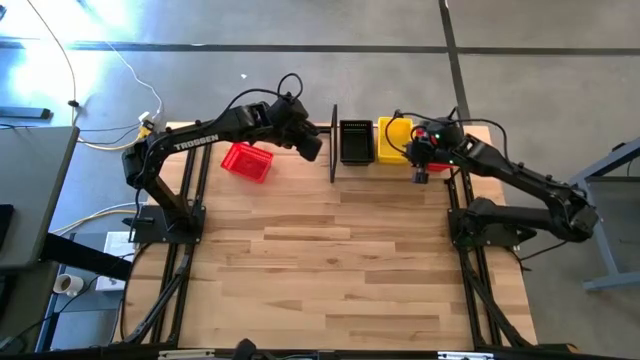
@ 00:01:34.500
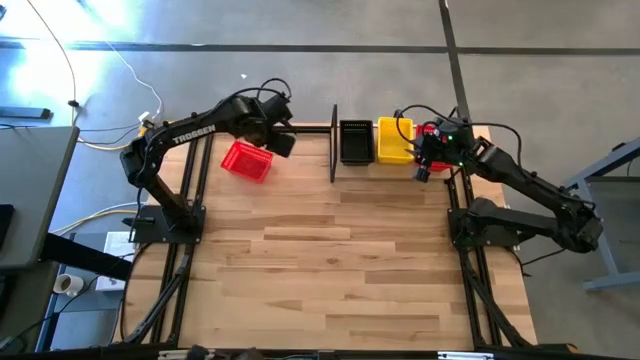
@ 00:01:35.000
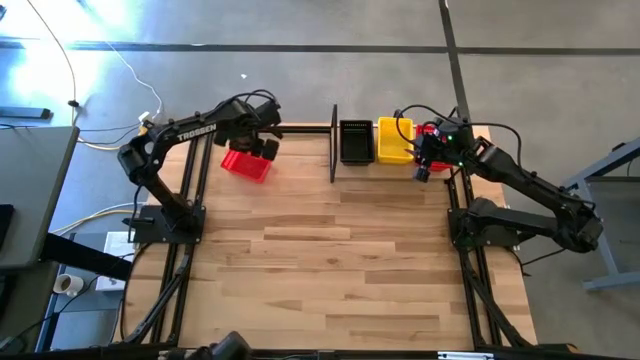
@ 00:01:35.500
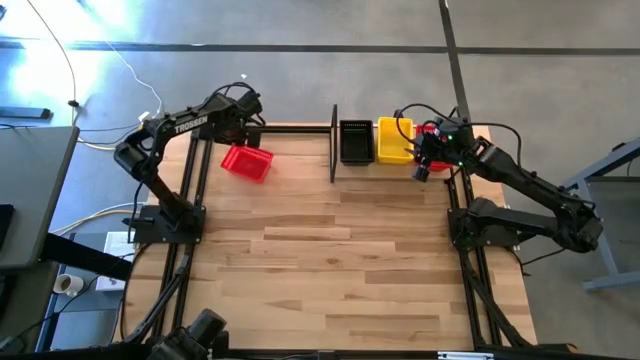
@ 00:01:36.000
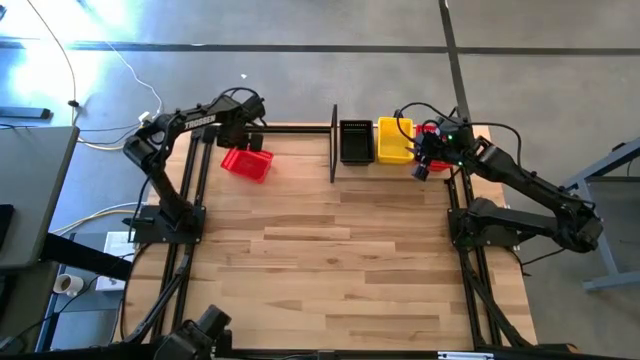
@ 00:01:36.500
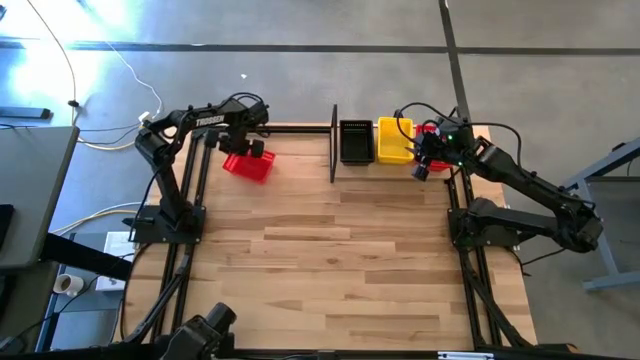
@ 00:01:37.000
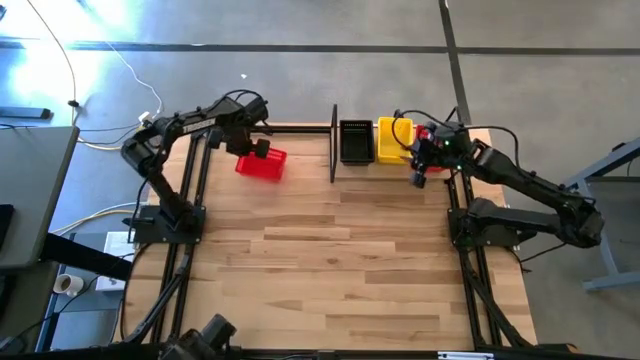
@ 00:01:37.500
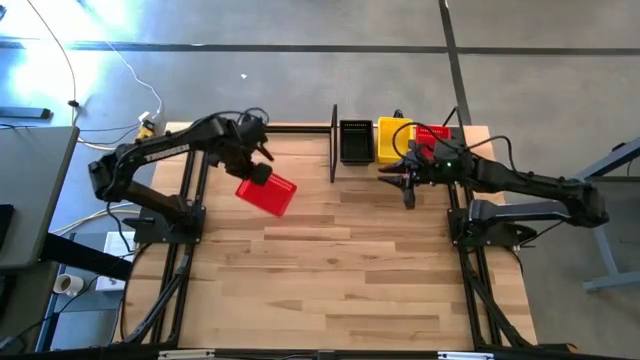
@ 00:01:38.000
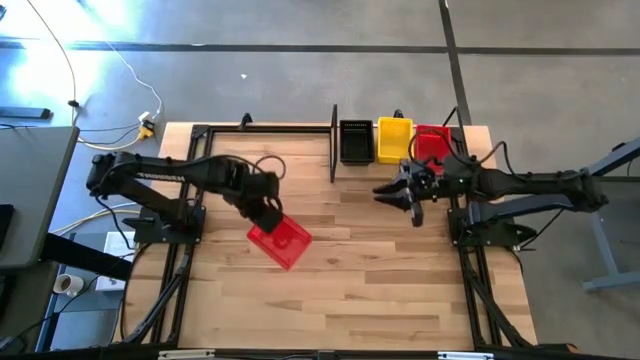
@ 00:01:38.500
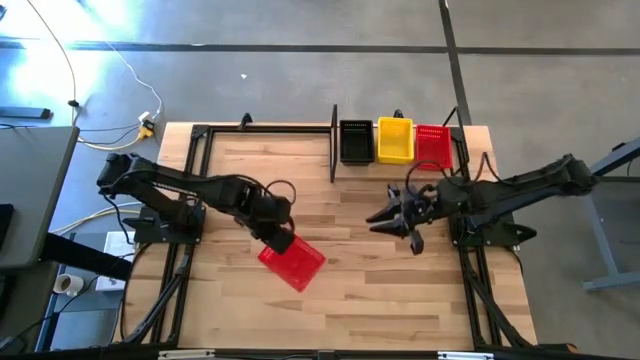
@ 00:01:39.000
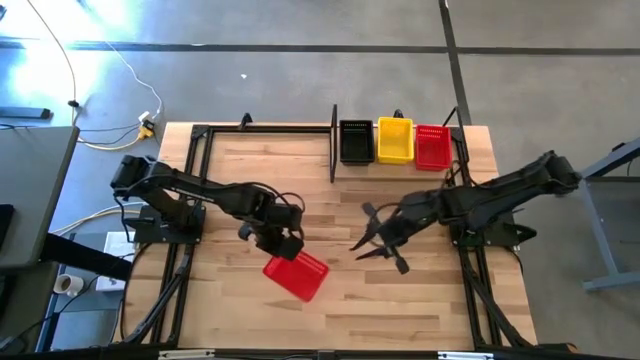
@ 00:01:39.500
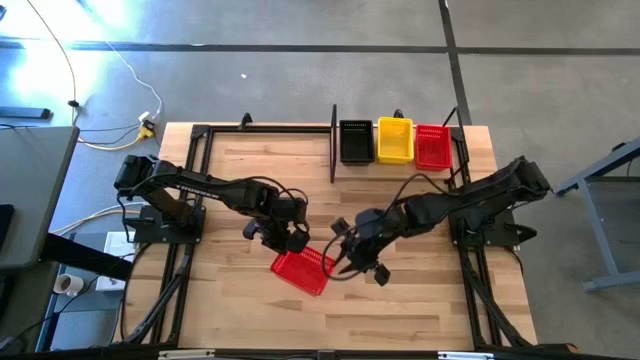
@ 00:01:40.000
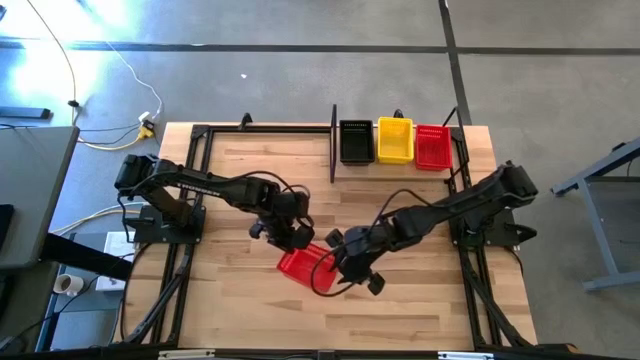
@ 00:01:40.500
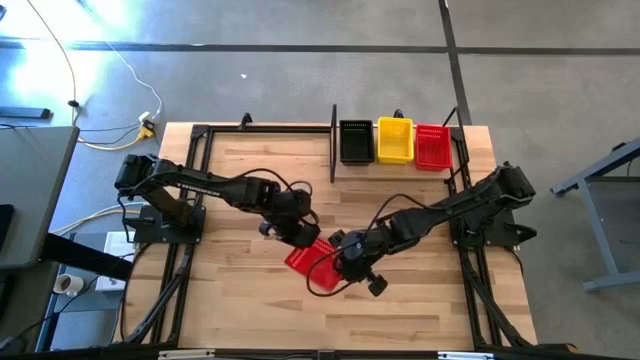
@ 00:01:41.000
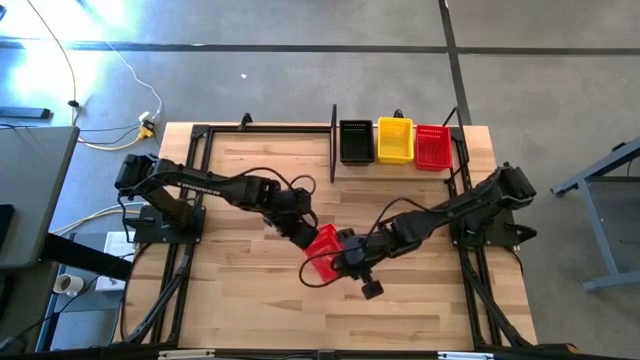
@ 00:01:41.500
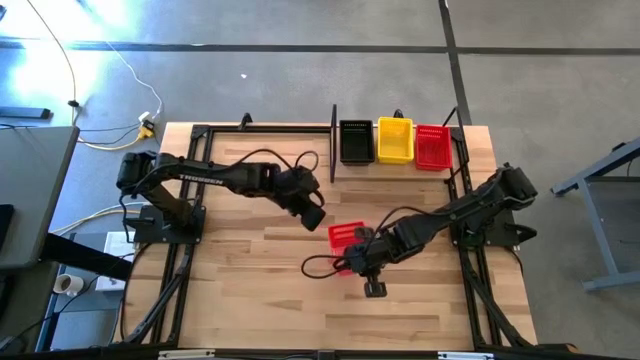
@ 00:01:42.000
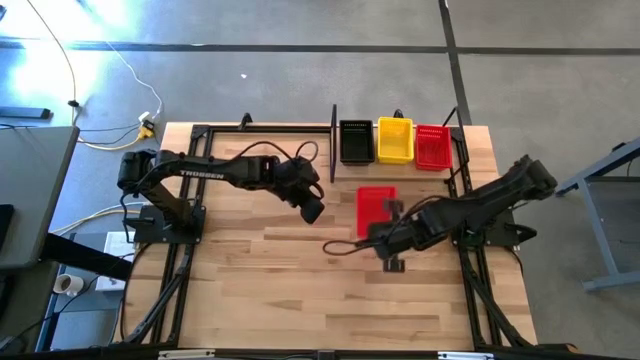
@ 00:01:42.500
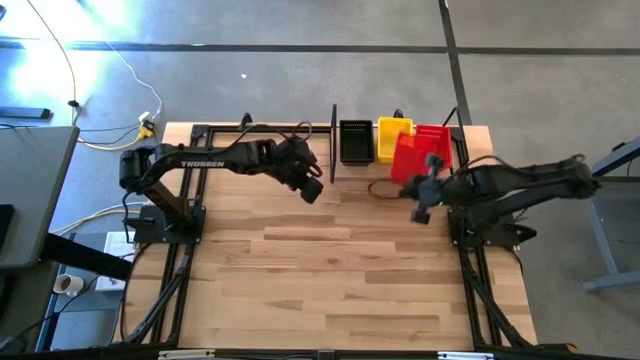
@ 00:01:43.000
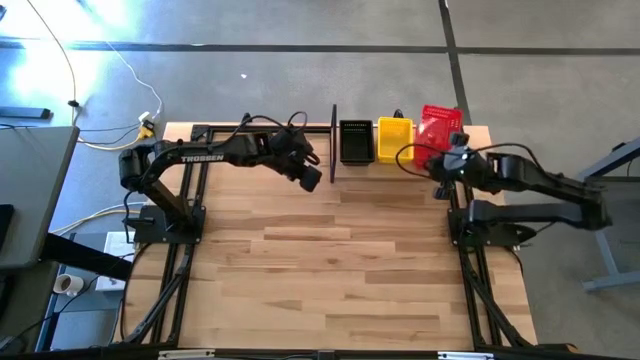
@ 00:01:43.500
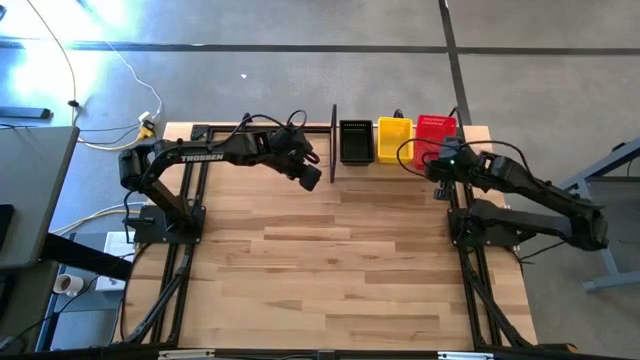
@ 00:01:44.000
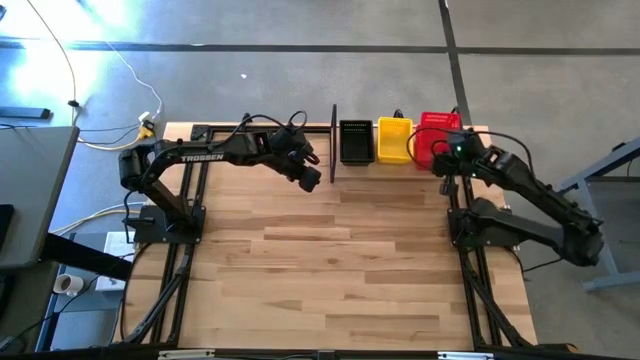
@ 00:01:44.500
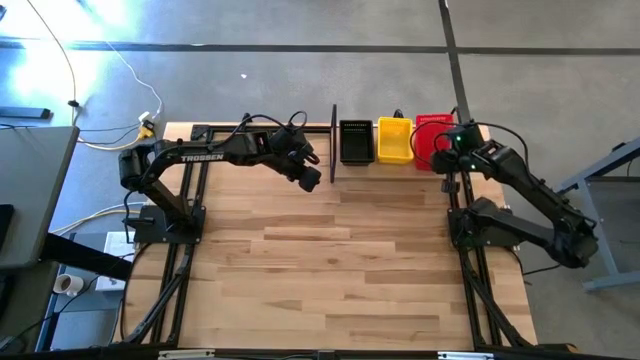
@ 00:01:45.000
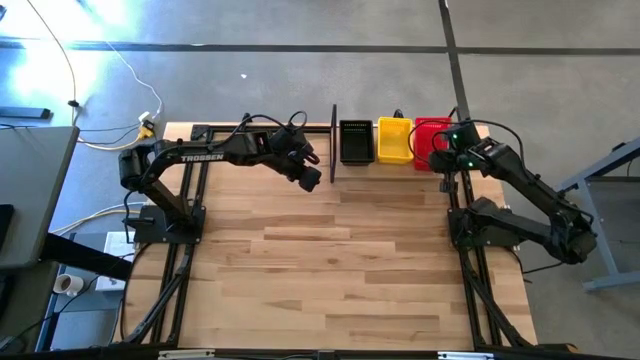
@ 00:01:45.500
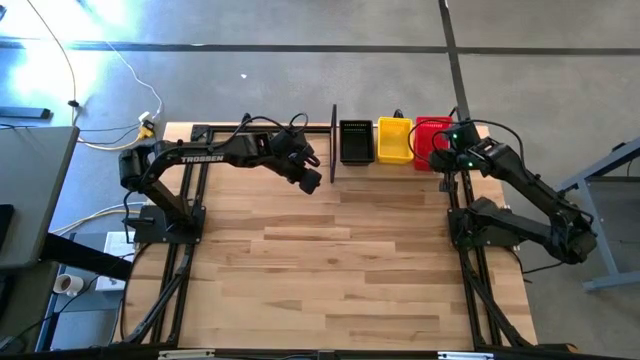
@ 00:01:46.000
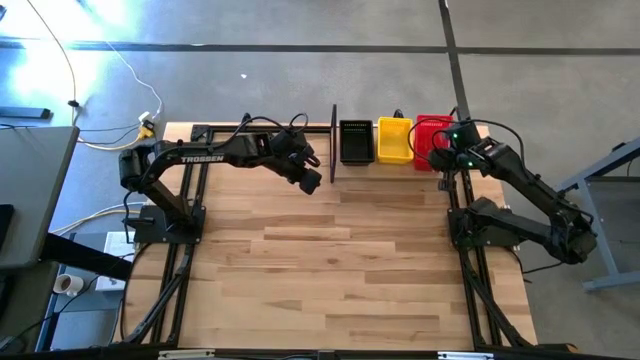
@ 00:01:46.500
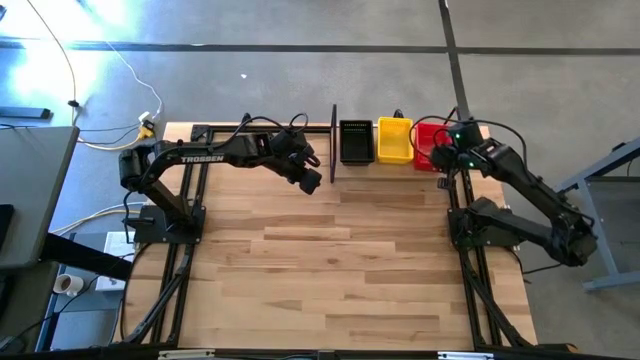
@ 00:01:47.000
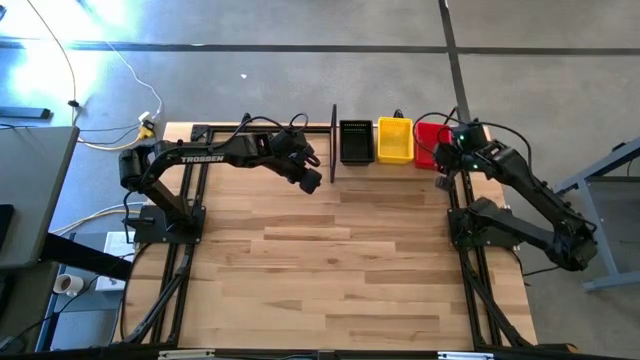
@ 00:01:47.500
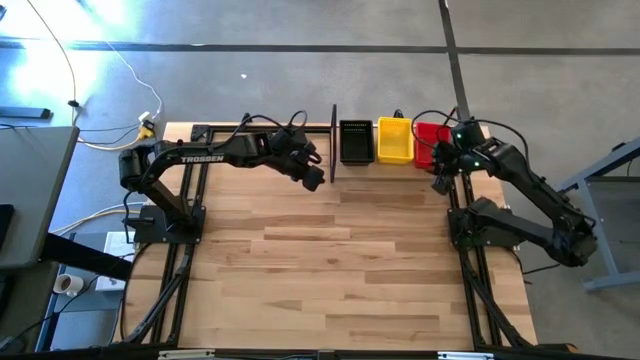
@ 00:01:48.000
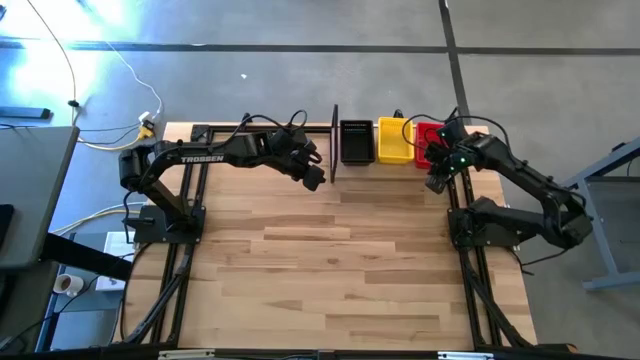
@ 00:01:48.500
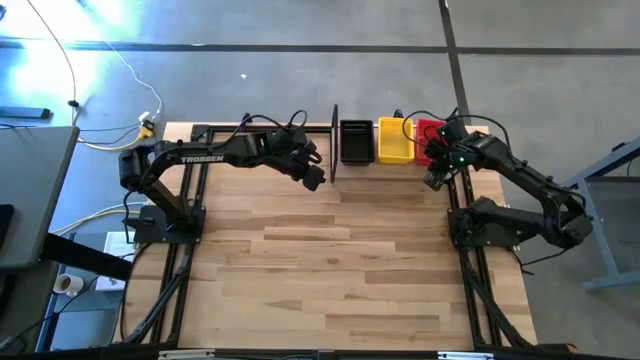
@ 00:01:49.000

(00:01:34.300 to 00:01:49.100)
Task: Stack baskets on shelf by color
Stack the red basket on the red basket on the shelf

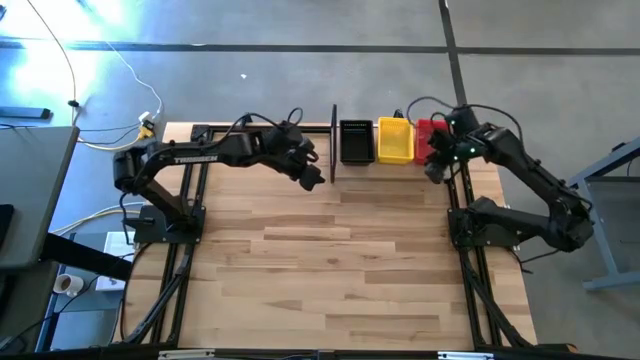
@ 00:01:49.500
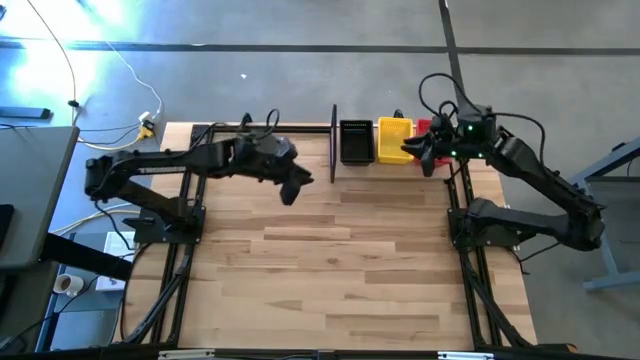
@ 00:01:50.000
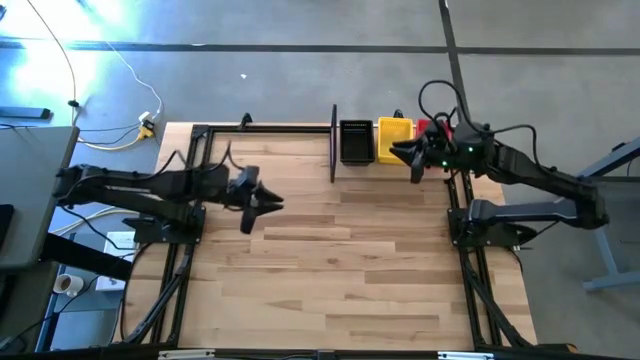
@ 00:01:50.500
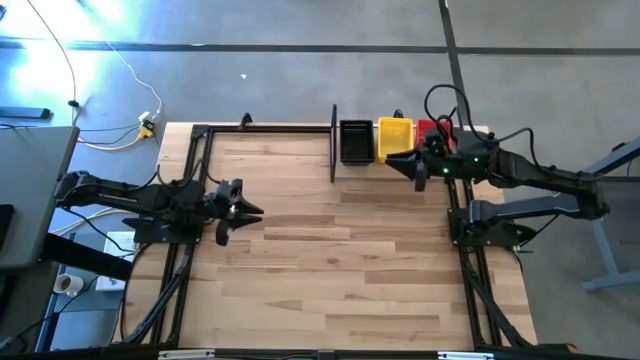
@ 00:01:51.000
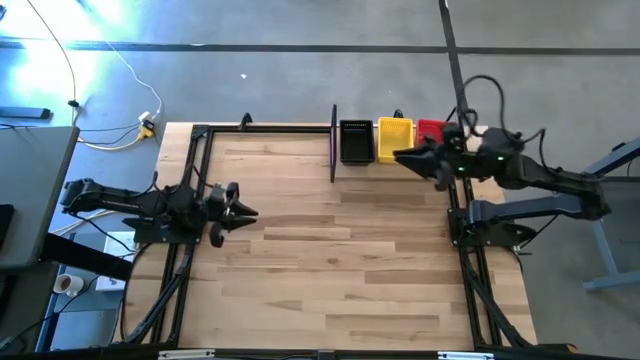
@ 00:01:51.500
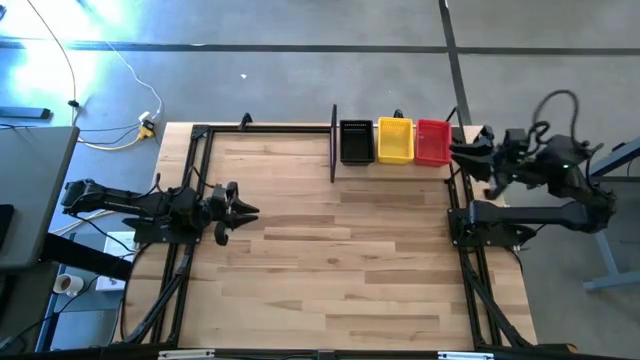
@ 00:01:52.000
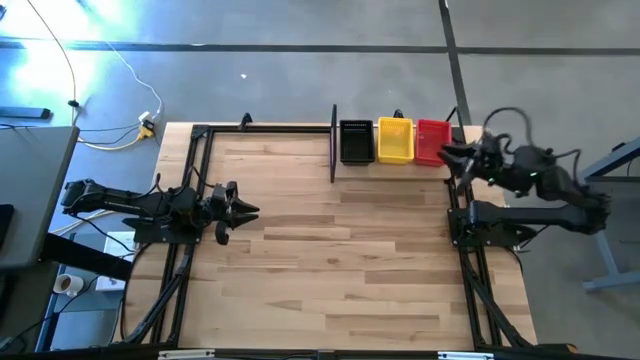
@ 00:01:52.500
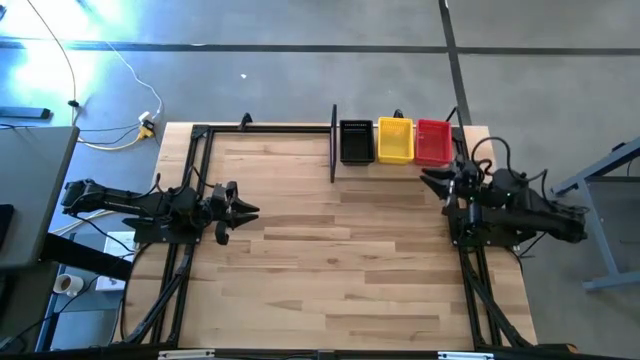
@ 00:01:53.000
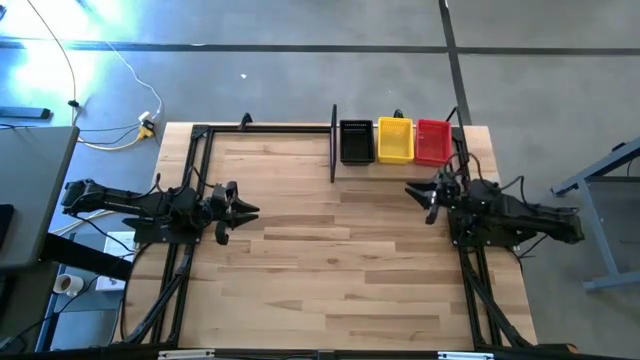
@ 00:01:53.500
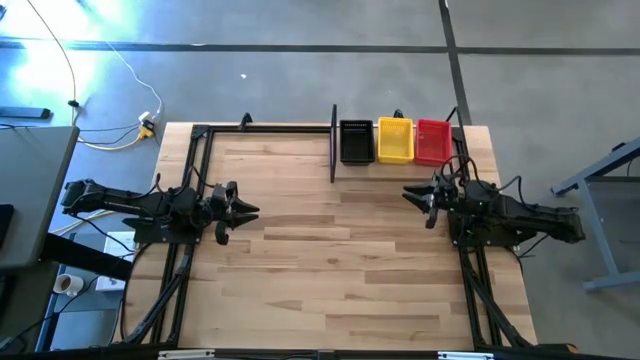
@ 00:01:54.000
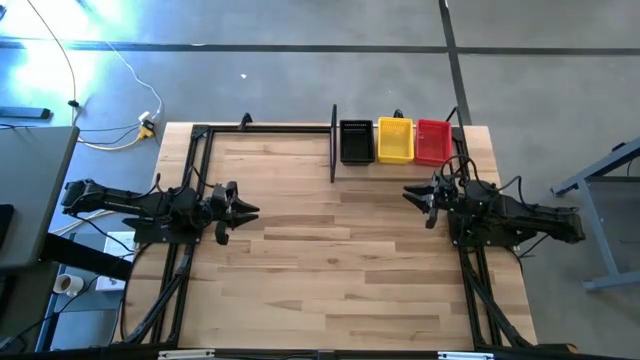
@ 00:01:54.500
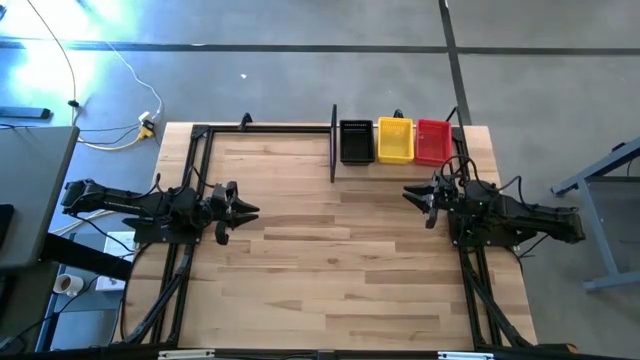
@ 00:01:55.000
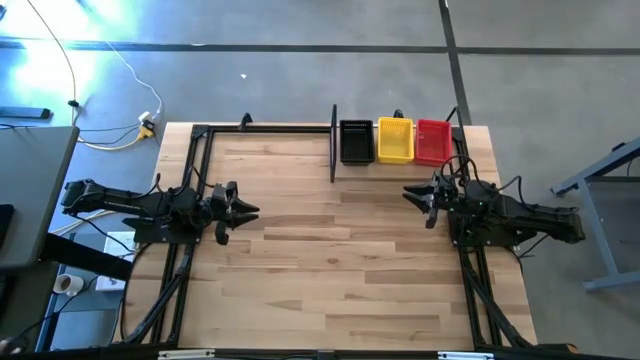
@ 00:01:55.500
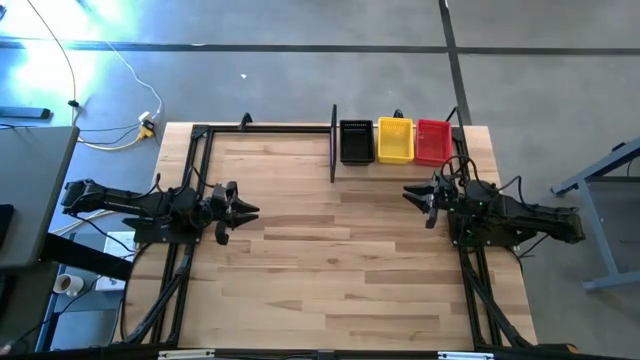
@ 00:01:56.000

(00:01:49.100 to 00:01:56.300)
Return to Home Position
